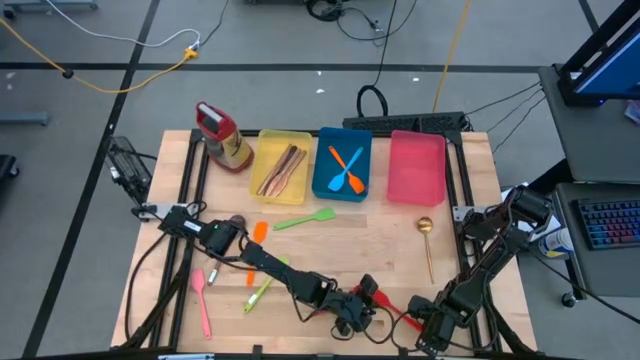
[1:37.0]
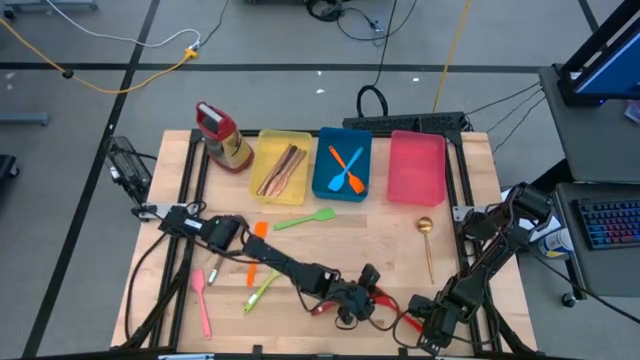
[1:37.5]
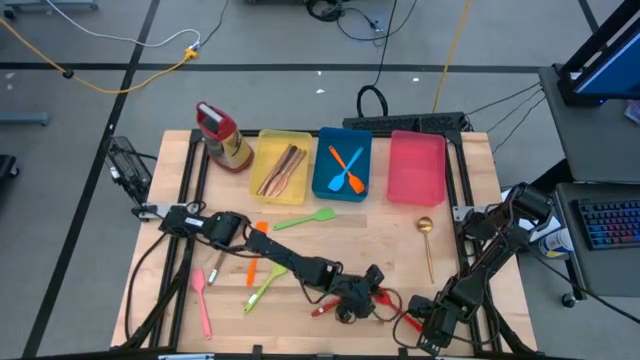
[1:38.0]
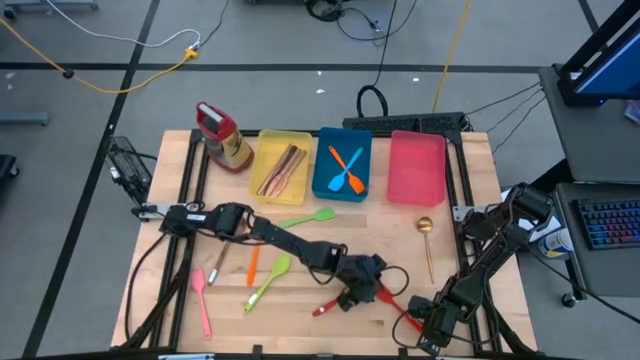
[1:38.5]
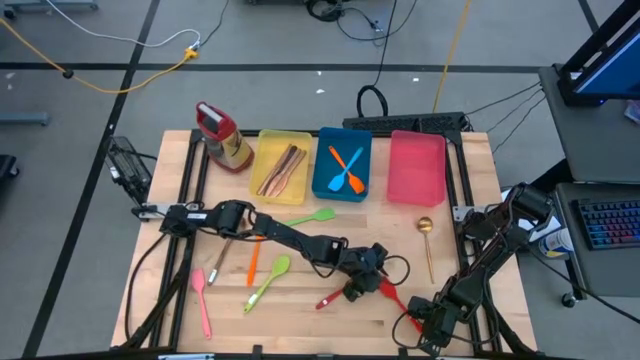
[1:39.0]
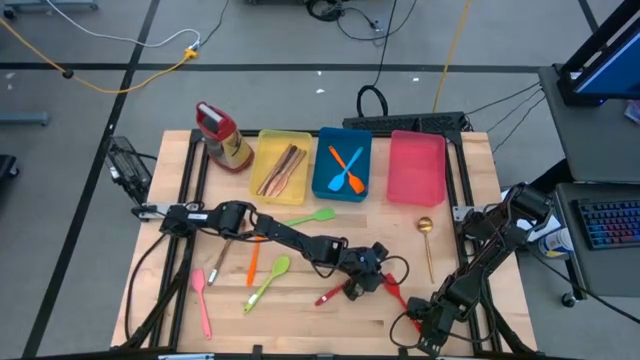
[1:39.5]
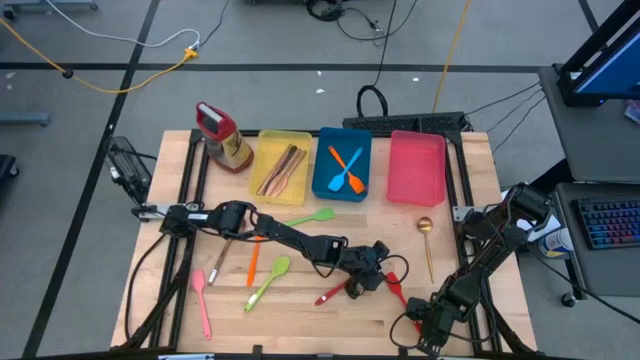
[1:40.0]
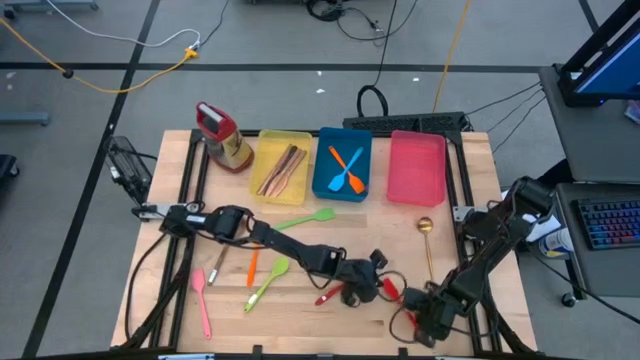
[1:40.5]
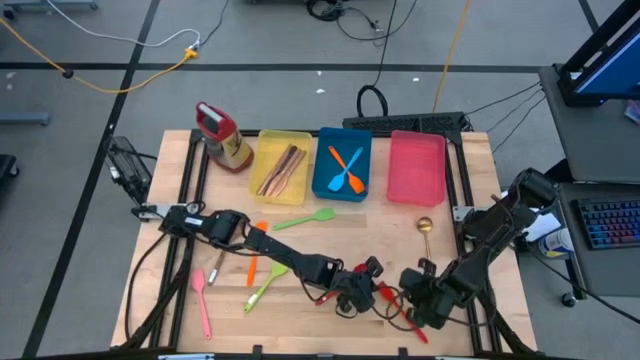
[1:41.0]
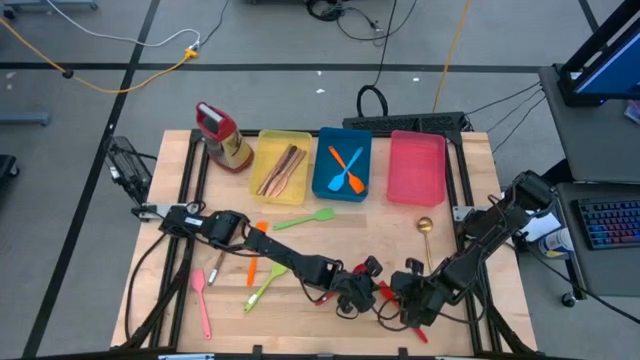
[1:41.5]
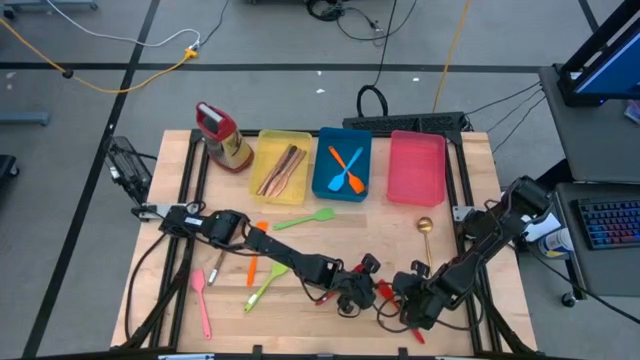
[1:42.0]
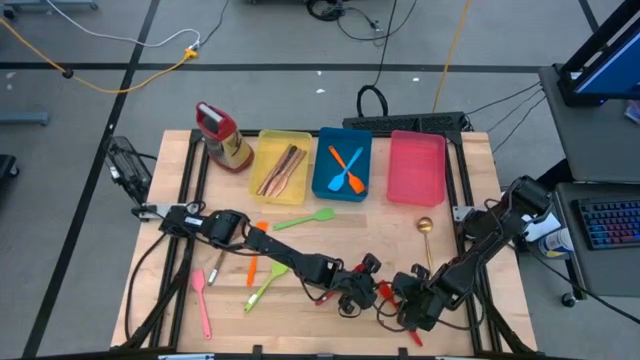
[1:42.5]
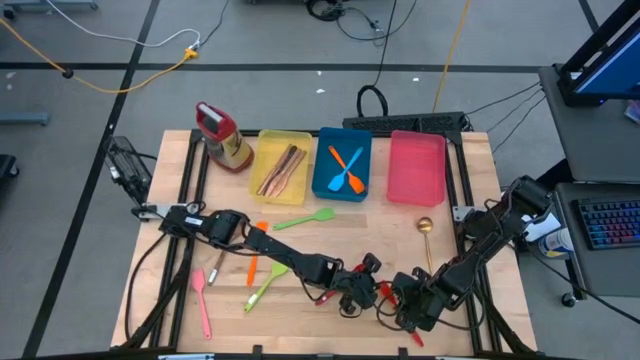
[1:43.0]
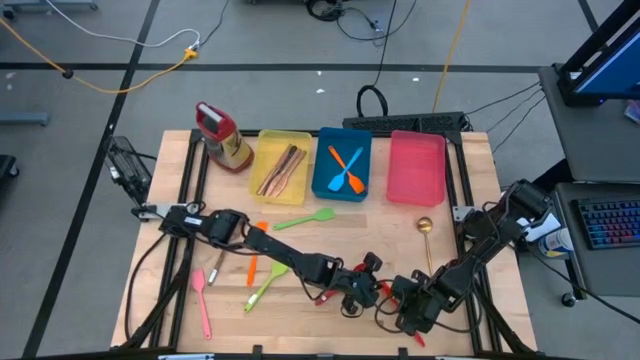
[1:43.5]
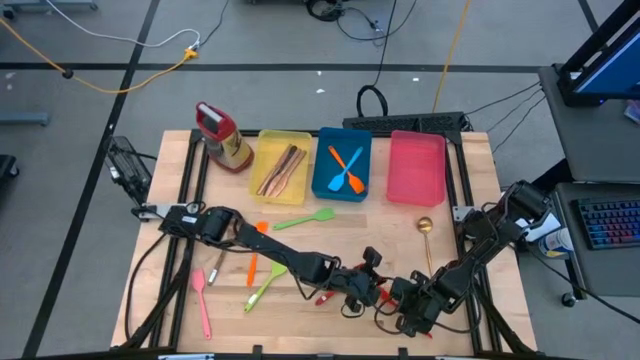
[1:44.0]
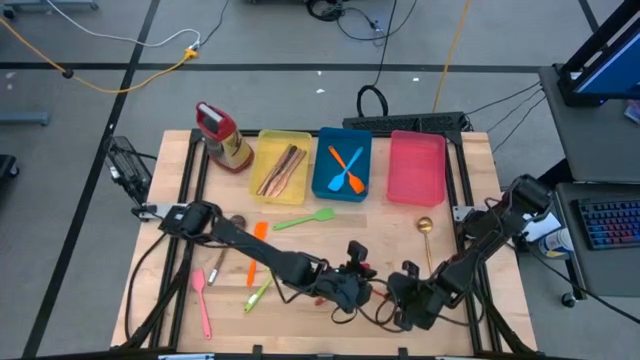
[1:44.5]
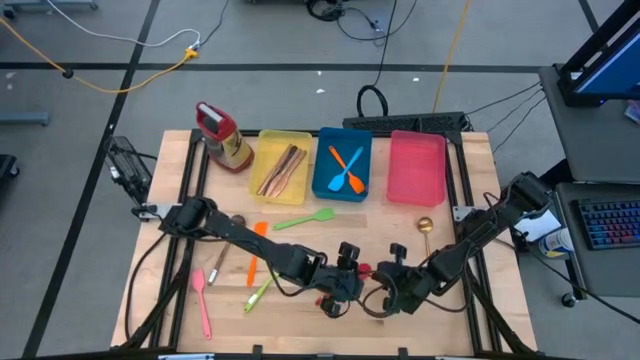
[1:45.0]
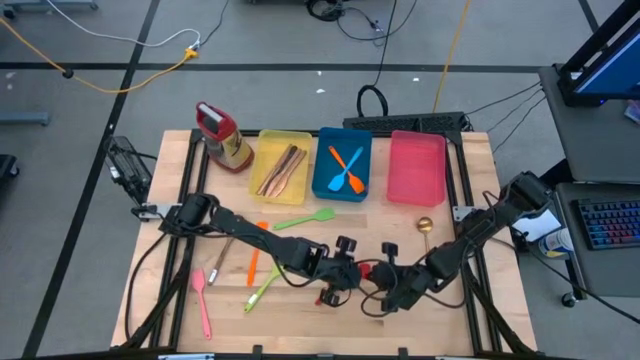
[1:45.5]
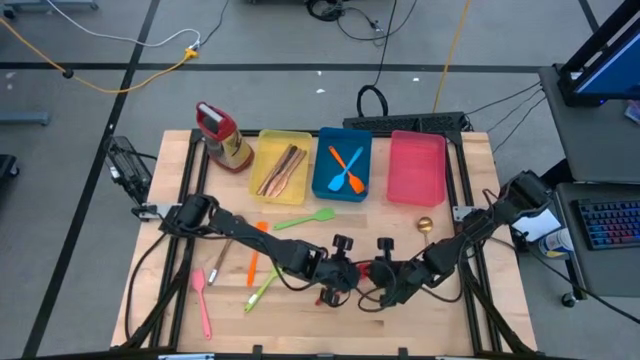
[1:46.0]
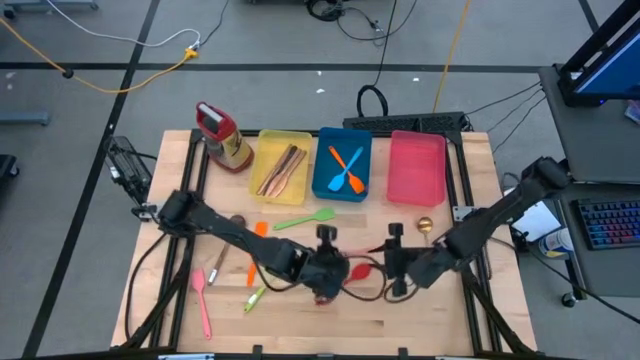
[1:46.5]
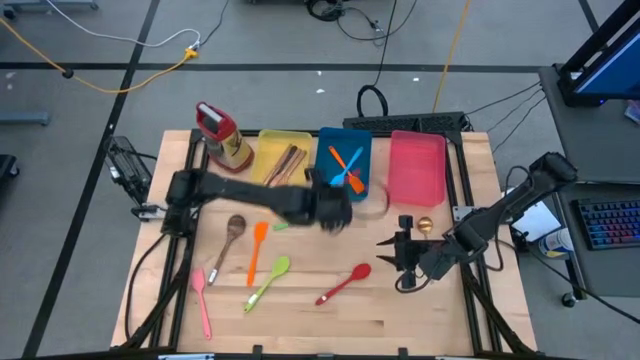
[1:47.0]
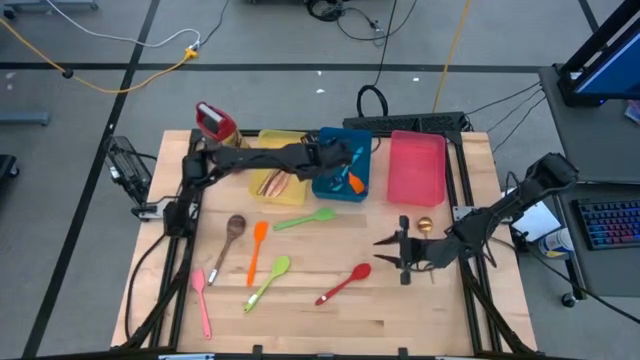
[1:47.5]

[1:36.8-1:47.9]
Task: Pick & Place Kitchen Items
Put the red spatula into the blue bin

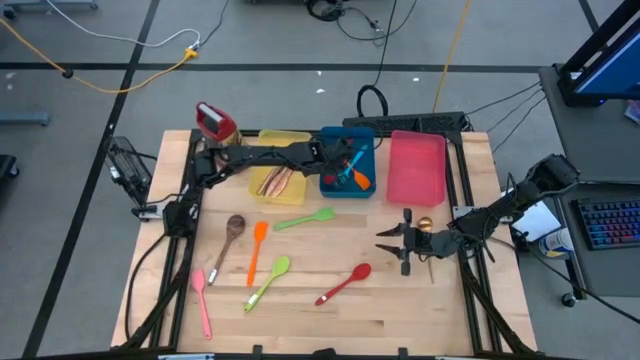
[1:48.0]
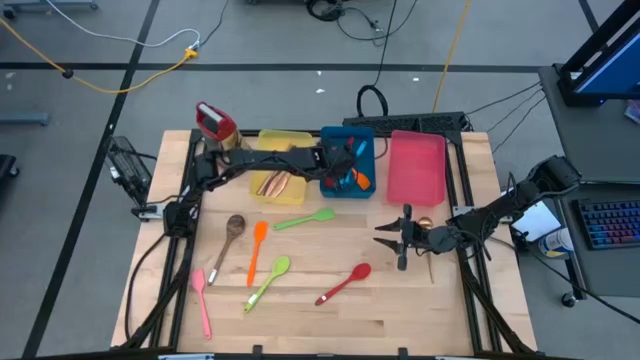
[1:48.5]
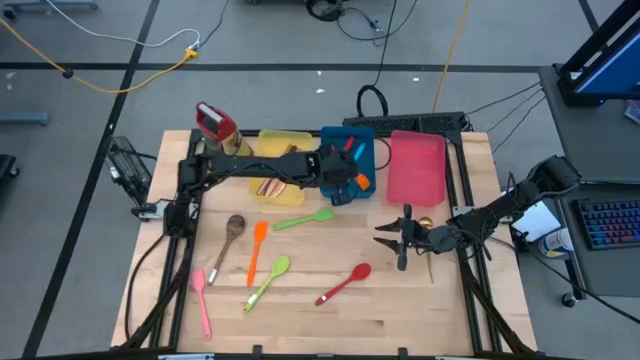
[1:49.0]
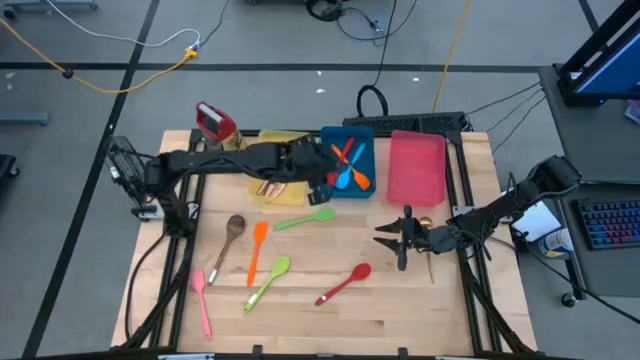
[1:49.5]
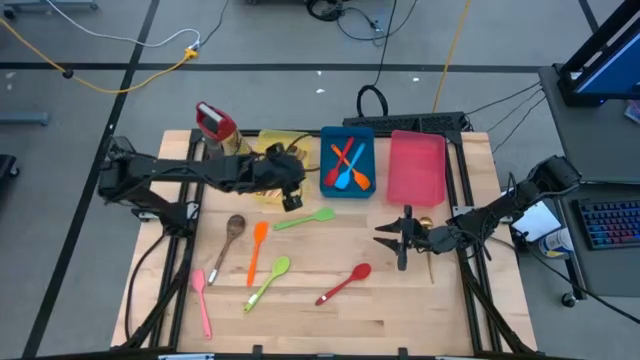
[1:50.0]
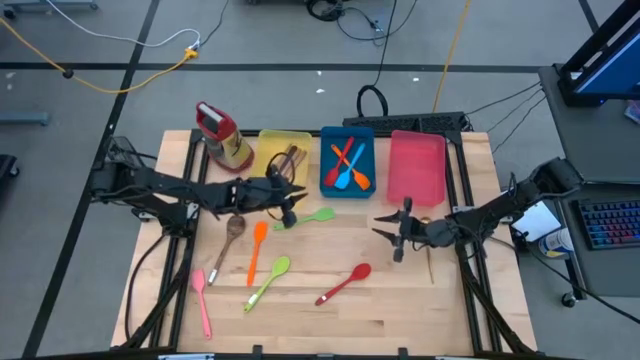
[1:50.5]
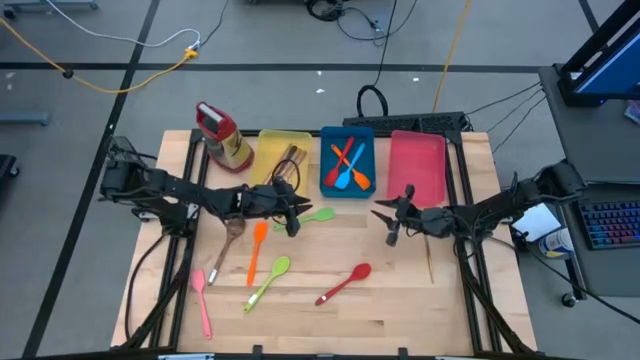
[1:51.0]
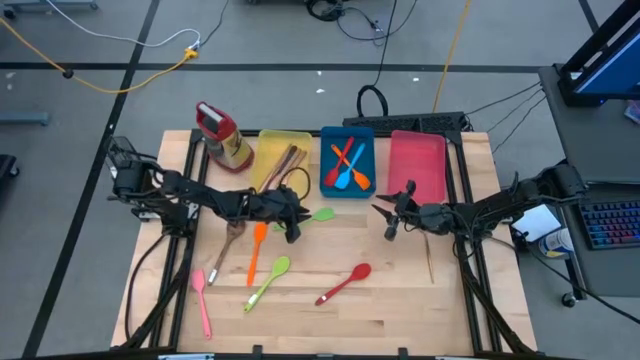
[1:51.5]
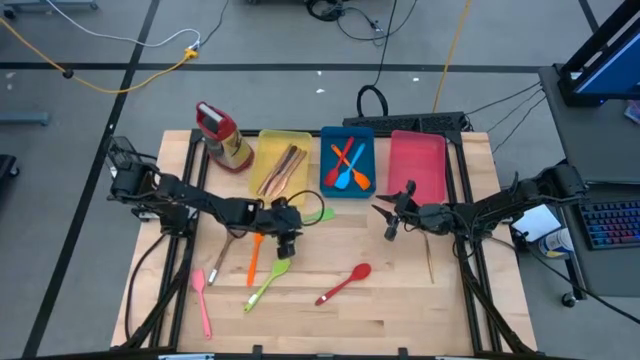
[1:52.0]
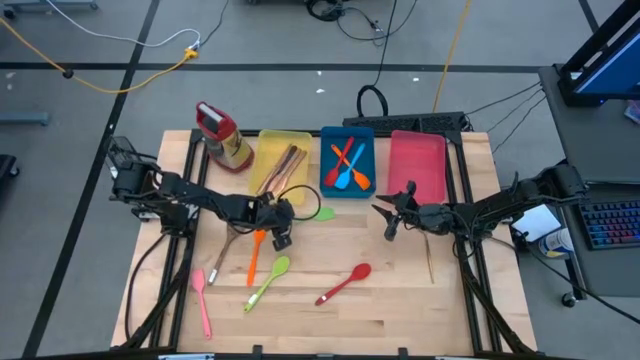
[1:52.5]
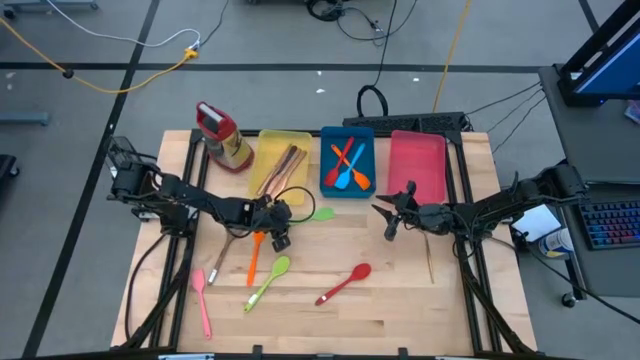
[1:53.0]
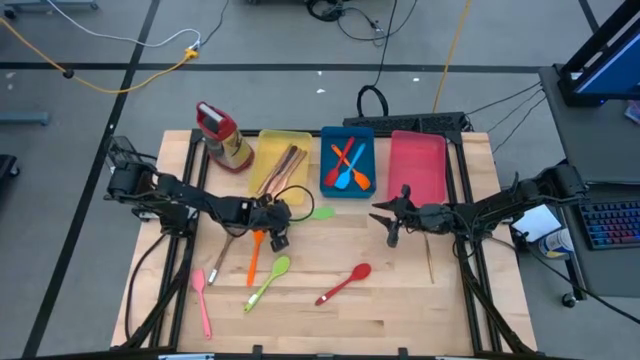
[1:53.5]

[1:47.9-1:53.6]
Put the green spatula into the blue bin

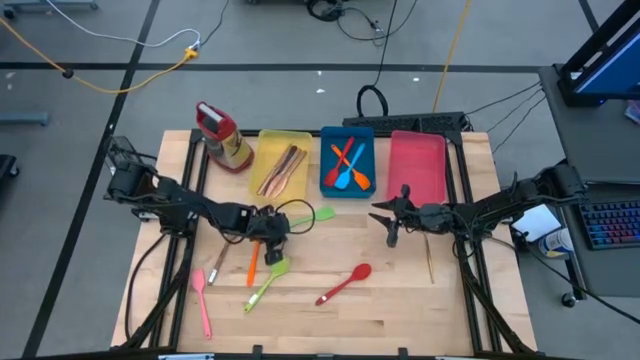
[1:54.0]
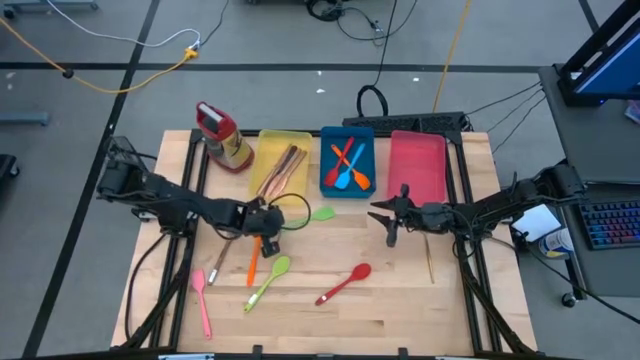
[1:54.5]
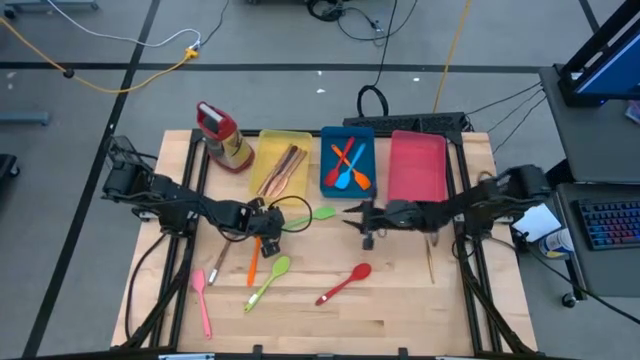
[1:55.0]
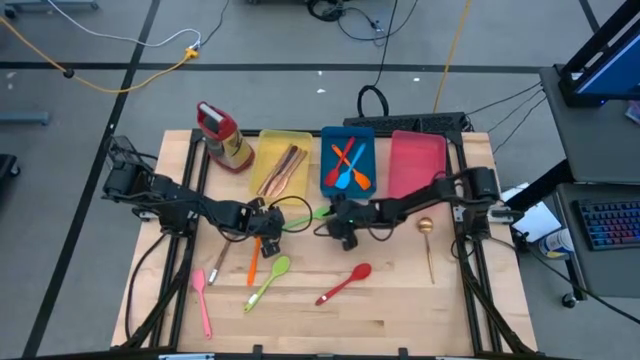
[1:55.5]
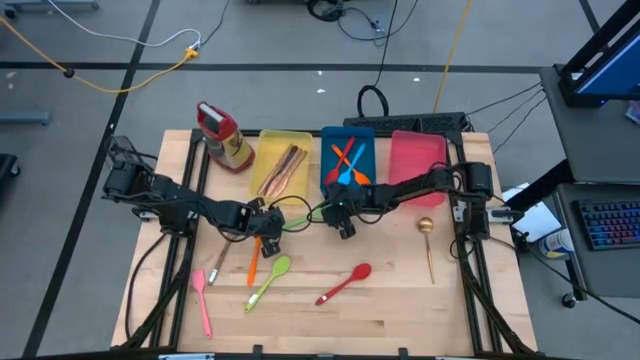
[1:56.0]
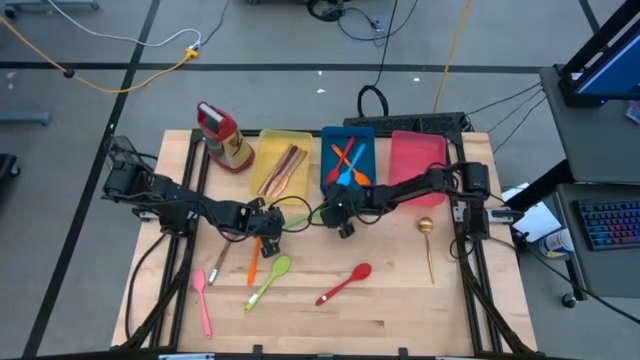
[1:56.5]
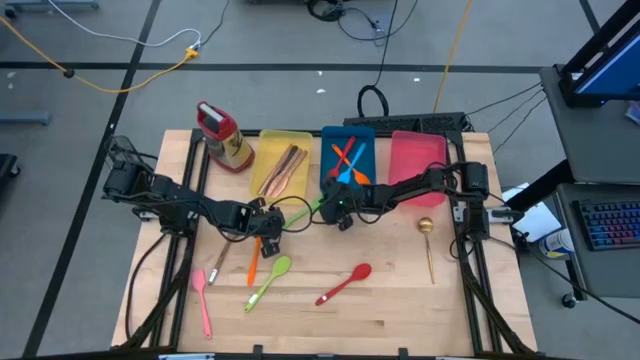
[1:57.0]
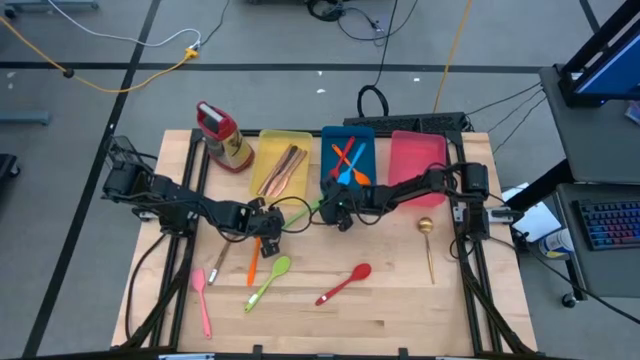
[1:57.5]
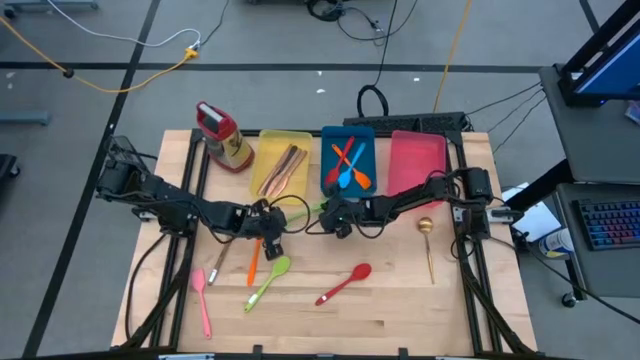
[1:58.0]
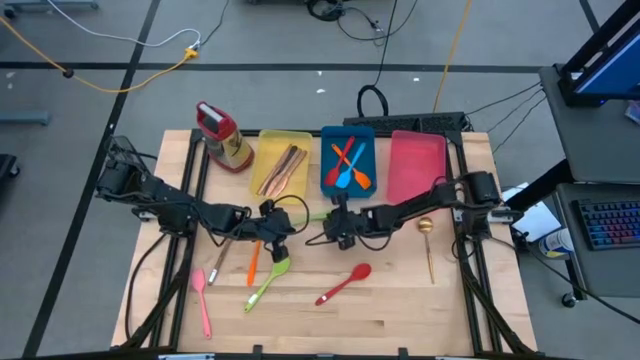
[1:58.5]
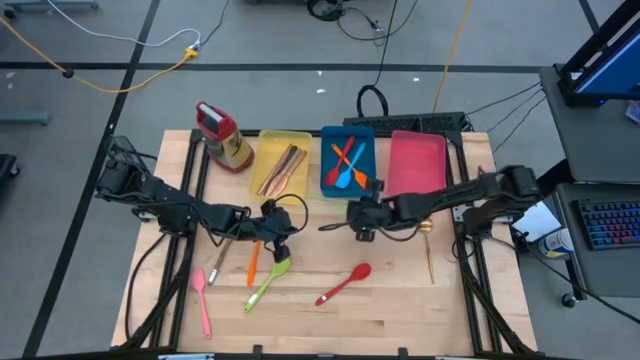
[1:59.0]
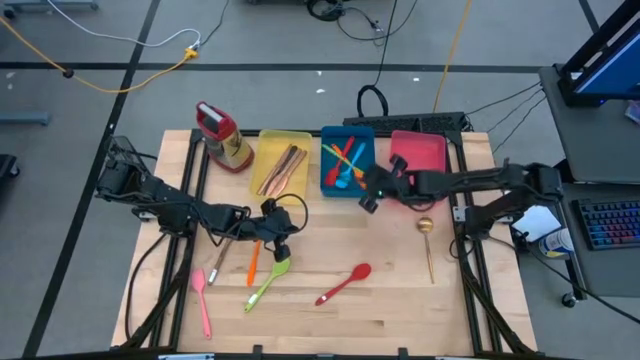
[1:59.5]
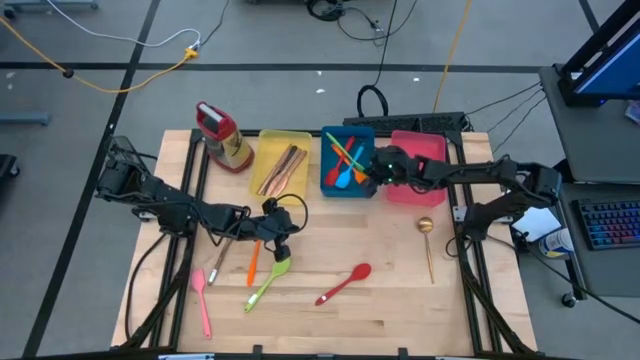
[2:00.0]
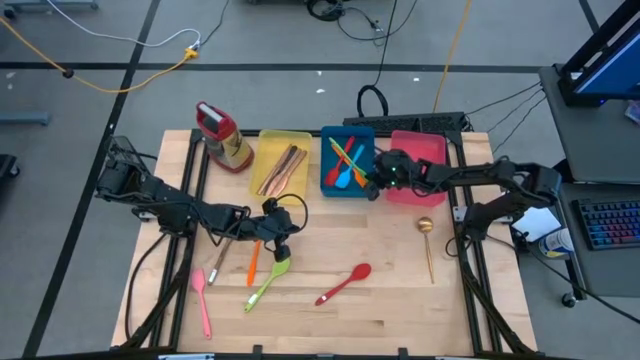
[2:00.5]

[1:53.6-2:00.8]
Put the green spatula into the blue bin
